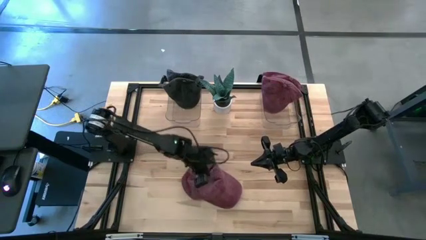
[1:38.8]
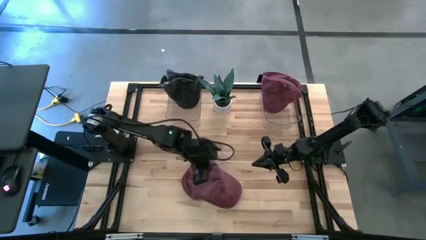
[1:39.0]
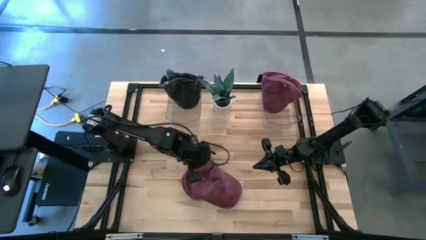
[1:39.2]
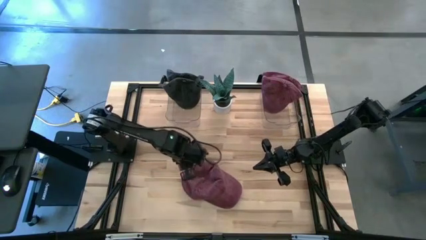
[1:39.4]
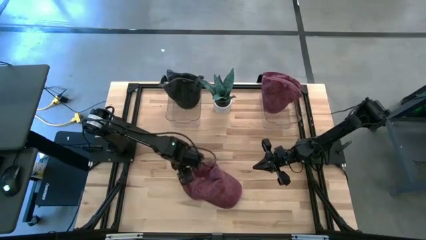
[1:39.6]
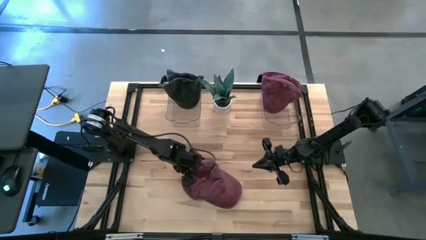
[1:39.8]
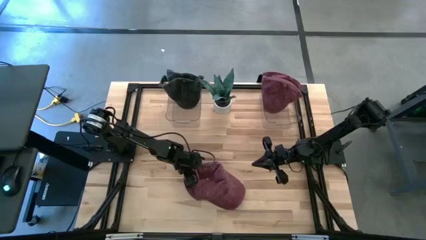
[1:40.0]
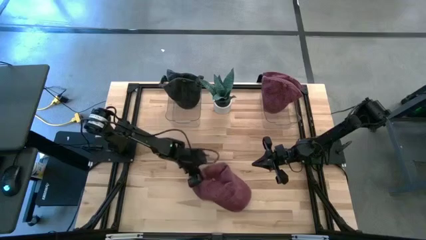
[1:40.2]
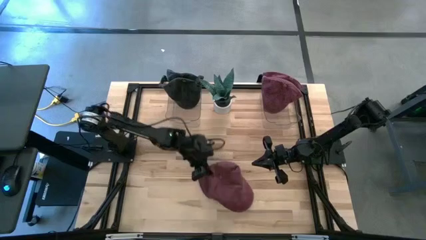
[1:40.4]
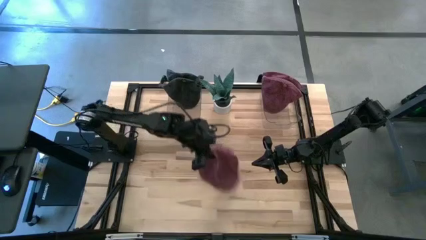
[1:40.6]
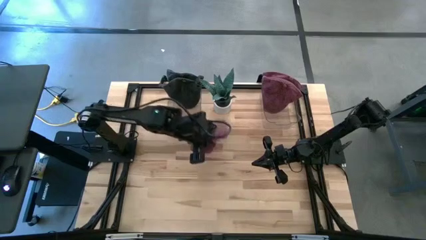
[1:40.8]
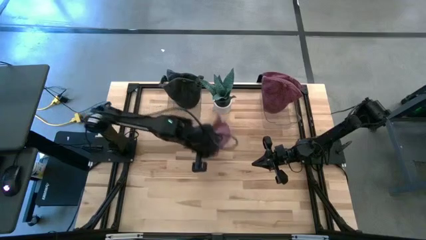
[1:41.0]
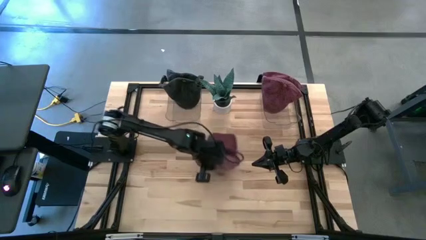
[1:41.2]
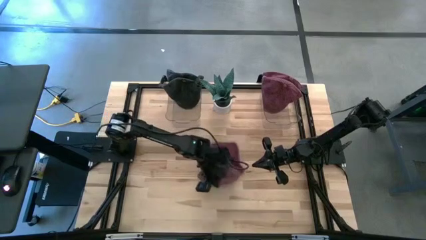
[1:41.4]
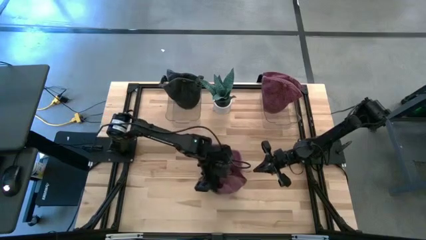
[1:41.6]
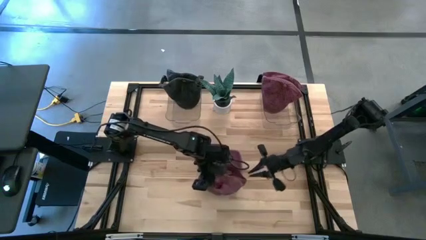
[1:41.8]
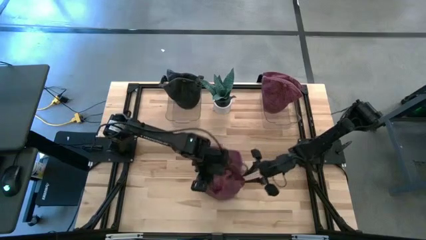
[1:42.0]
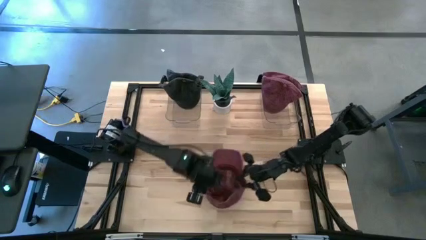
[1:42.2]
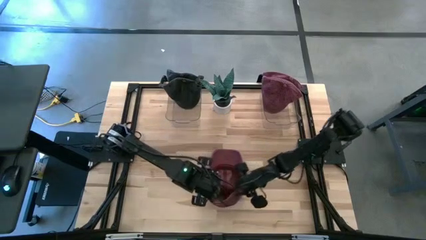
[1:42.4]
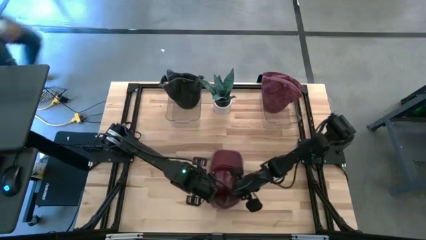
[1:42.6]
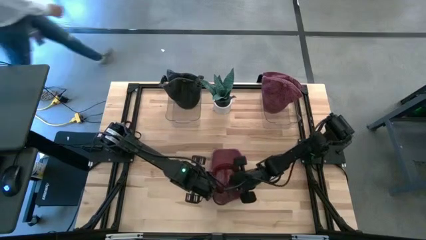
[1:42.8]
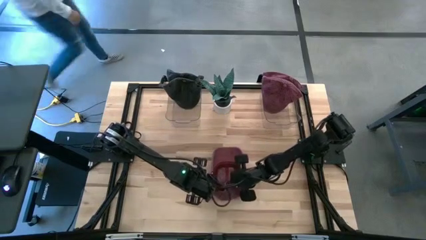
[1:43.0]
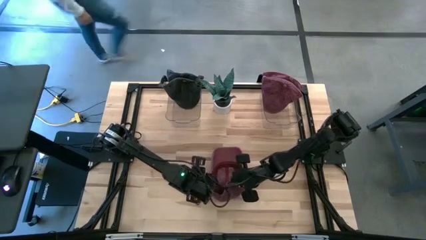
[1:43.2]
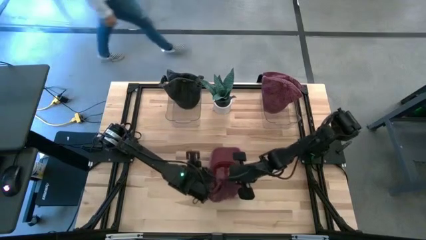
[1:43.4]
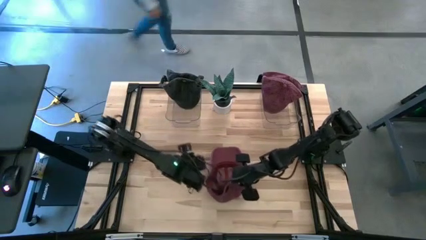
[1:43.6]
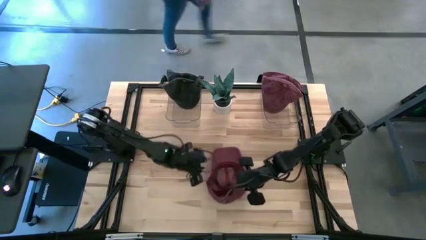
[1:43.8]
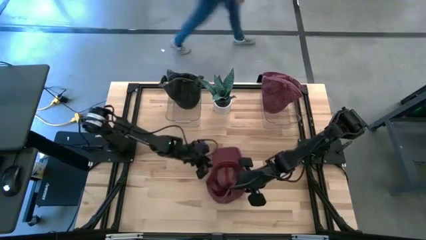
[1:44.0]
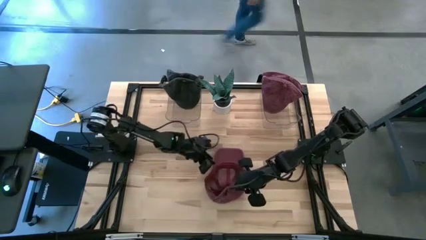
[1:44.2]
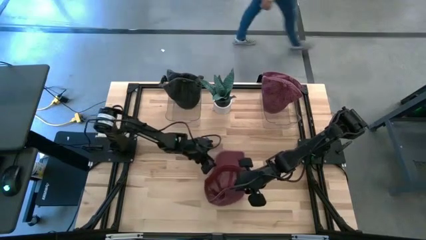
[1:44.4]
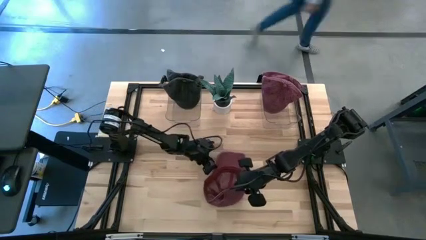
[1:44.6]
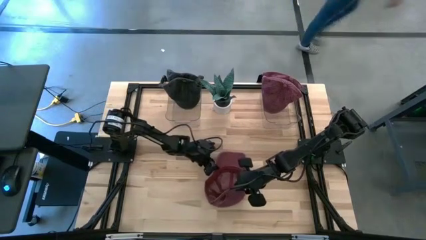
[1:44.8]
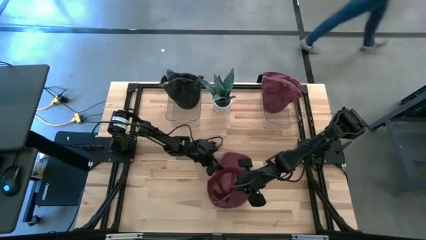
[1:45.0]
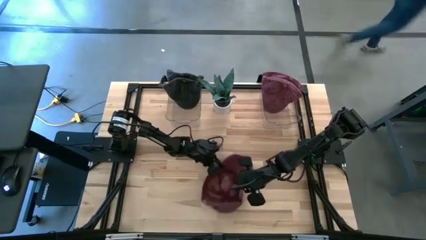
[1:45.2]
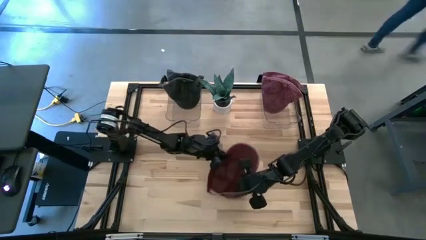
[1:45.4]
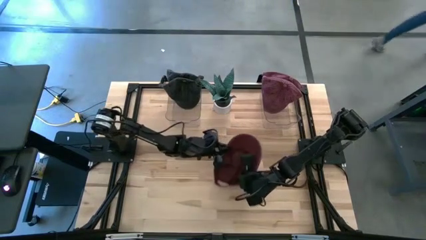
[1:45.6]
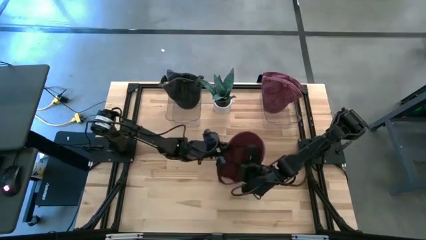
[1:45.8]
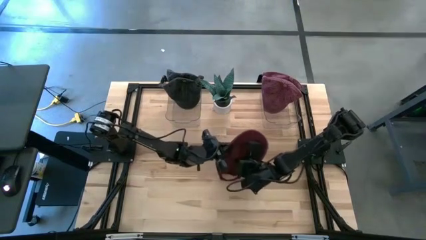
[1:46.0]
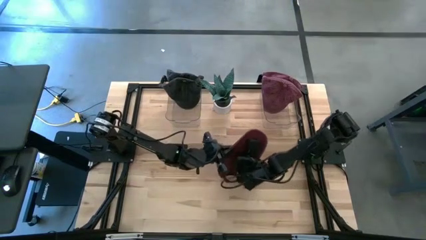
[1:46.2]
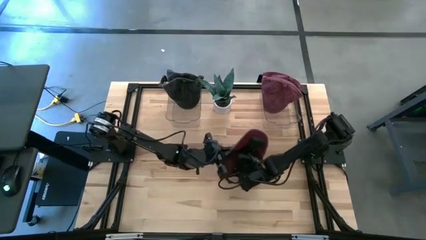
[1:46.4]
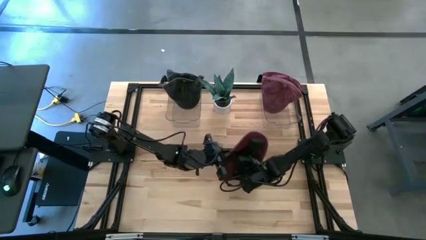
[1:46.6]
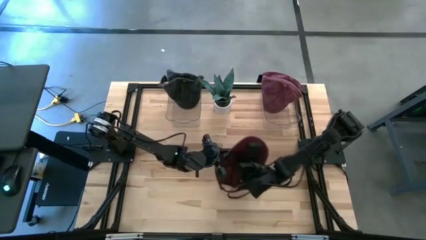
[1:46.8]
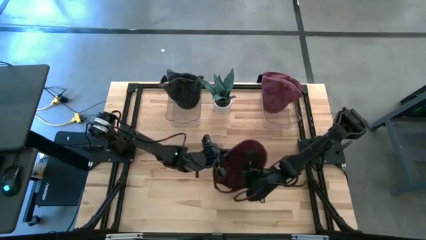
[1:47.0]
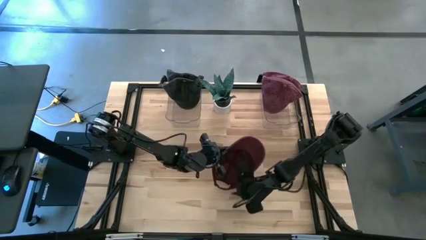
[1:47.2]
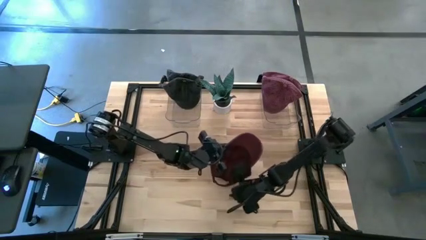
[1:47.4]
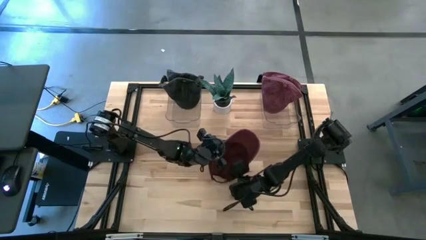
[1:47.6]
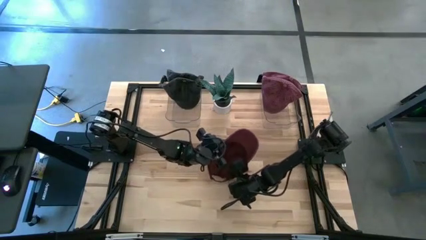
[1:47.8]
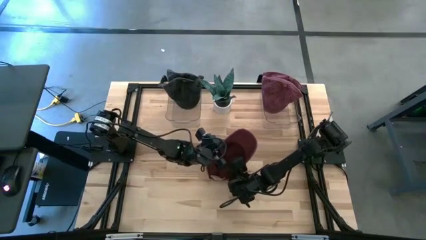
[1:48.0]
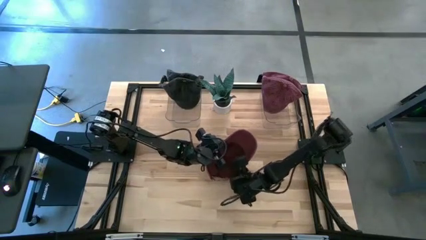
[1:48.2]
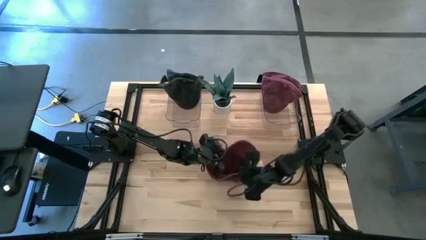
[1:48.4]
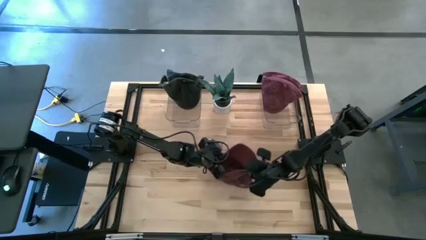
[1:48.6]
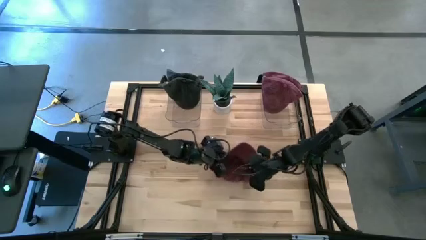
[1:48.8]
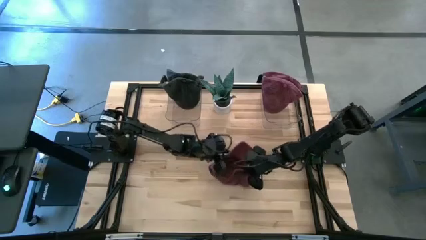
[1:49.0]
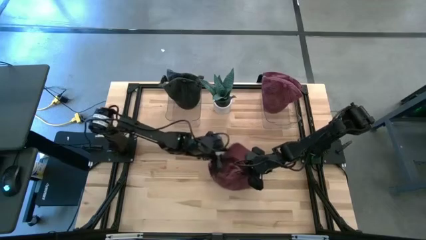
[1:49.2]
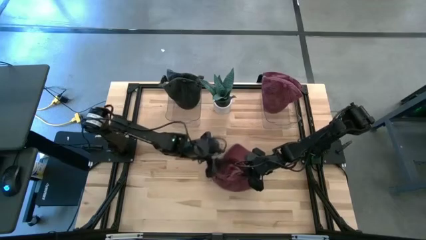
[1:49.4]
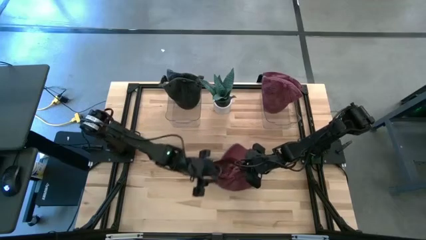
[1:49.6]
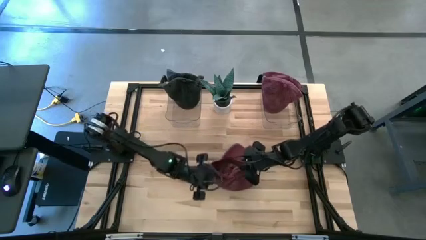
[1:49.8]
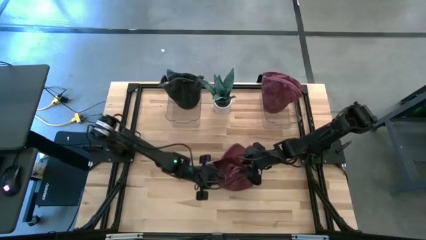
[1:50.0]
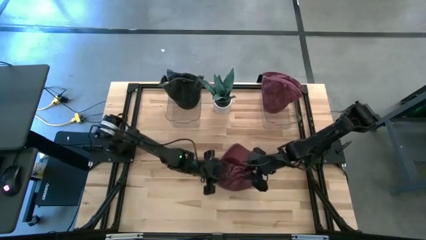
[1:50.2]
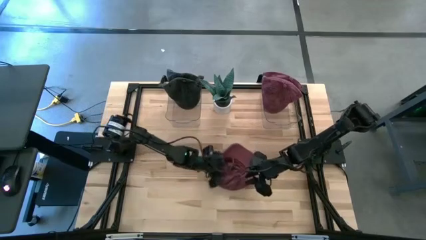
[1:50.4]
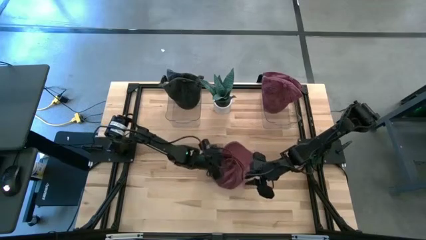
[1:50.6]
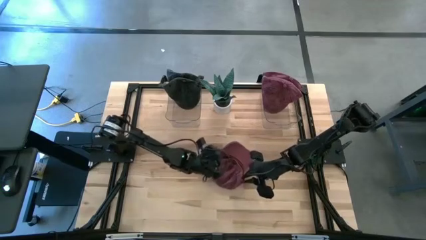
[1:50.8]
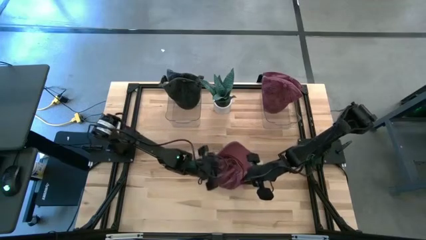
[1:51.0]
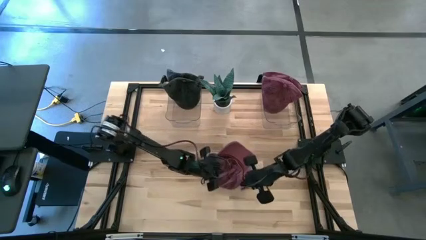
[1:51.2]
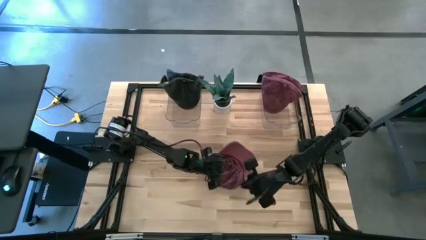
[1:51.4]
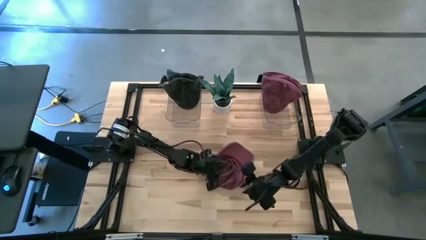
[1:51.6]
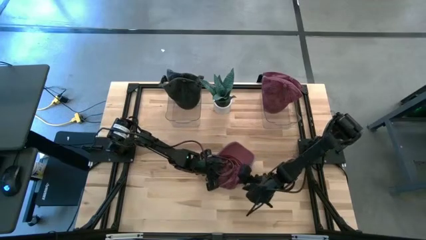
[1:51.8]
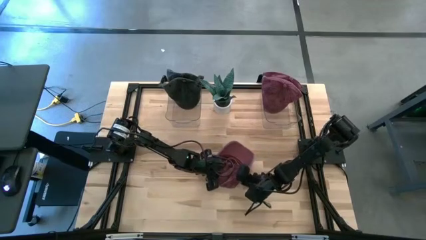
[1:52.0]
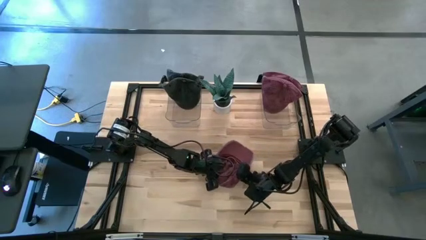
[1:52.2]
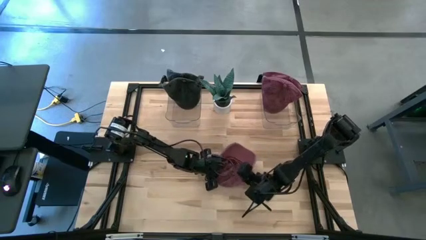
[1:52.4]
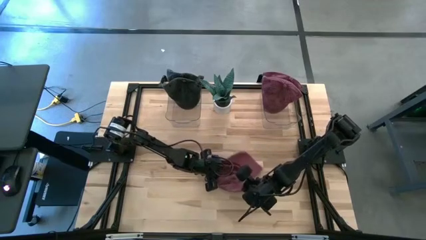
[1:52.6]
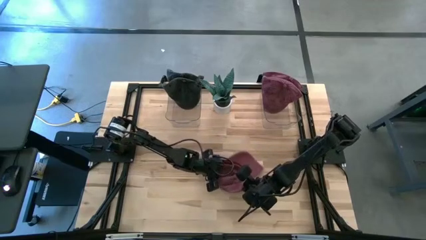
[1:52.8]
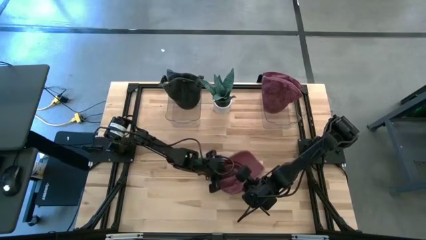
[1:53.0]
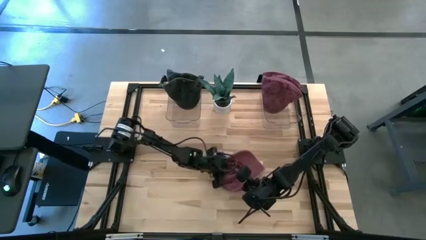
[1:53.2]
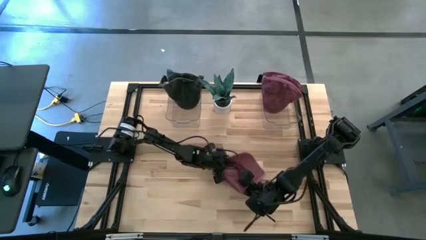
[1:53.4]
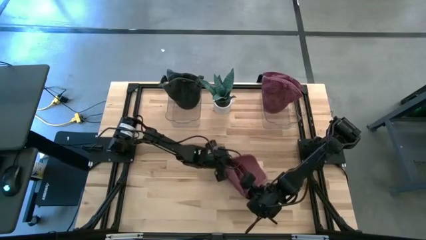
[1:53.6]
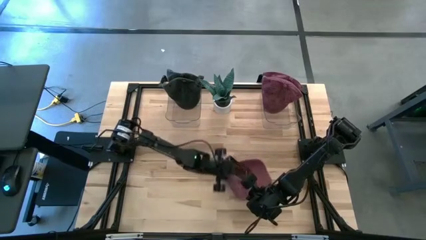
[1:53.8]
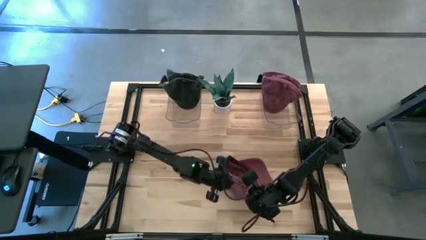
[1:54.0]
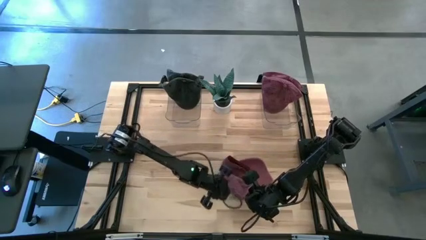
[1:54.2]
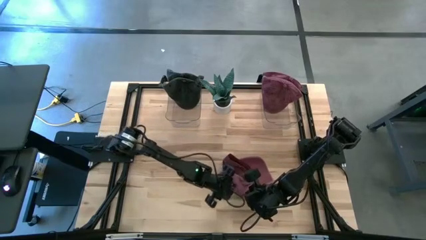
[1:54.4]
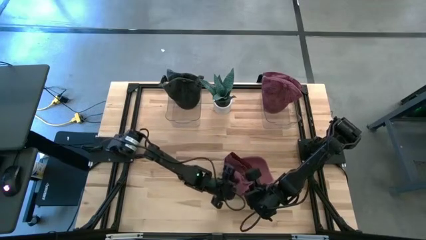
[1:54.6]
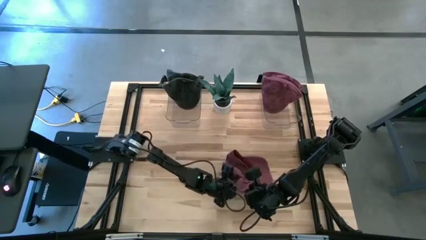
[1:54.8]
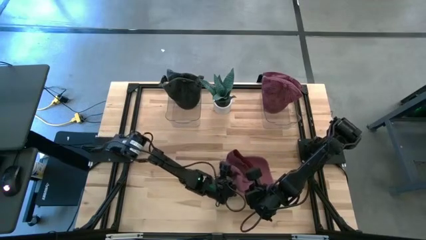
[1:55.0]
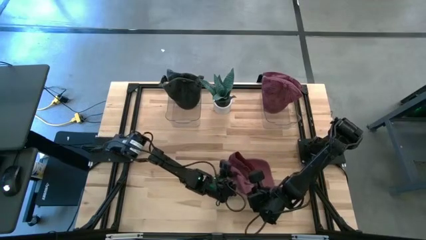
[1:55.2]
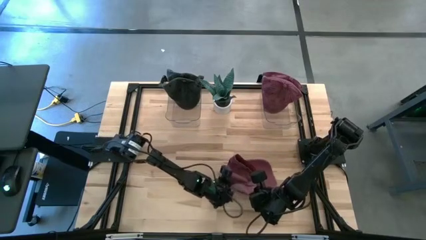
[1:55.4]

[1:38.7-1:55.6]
Task: Pick & Place hat
Put the red cap into the right transparent bin
